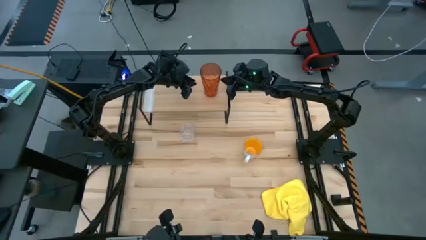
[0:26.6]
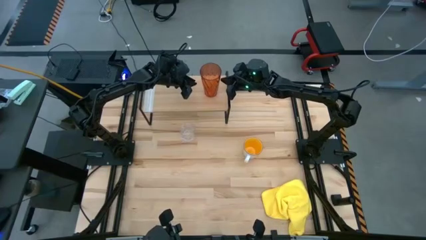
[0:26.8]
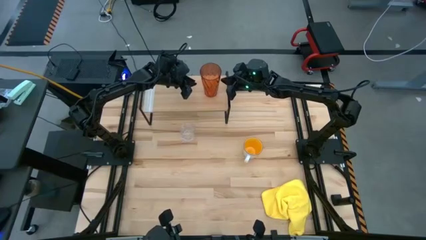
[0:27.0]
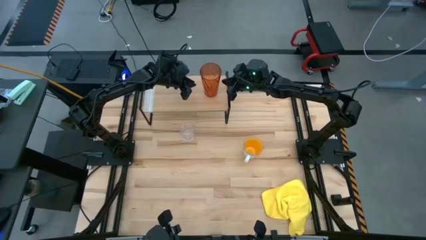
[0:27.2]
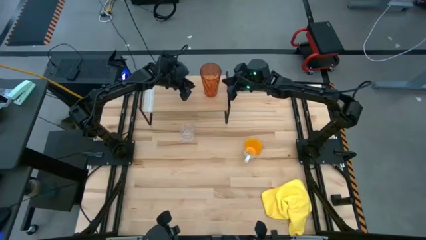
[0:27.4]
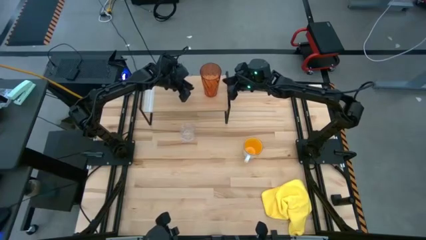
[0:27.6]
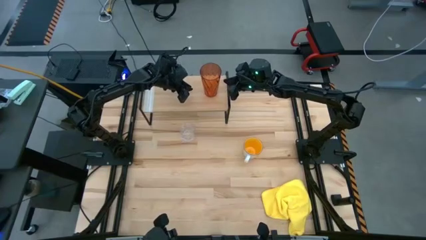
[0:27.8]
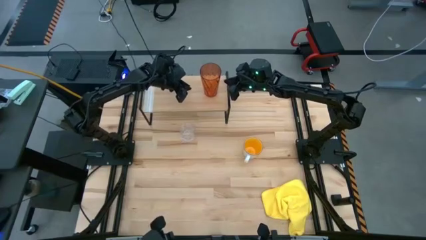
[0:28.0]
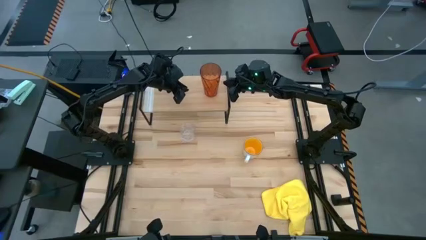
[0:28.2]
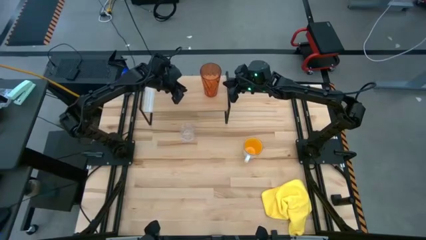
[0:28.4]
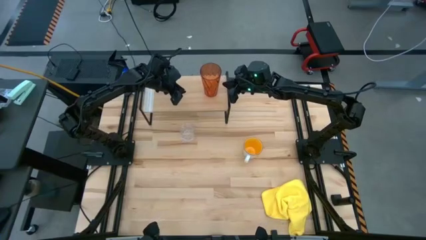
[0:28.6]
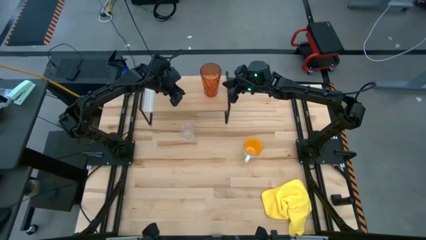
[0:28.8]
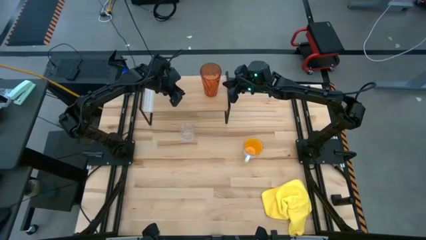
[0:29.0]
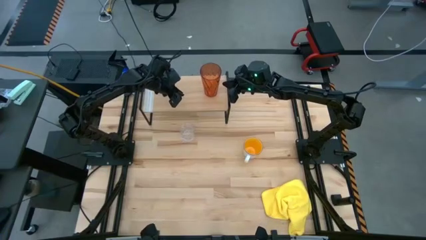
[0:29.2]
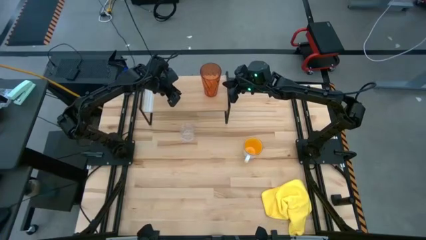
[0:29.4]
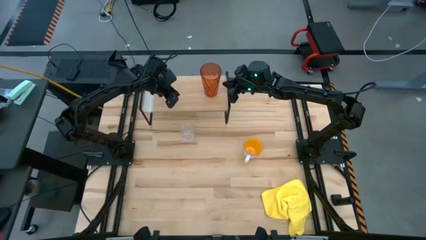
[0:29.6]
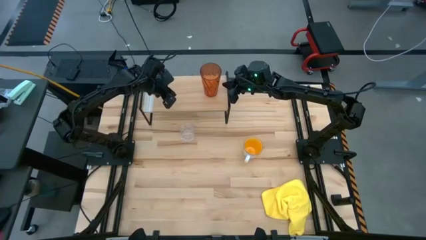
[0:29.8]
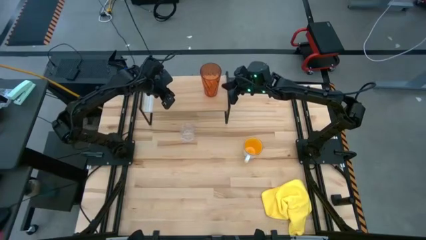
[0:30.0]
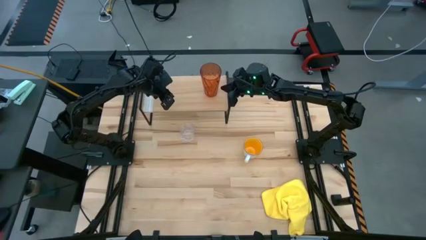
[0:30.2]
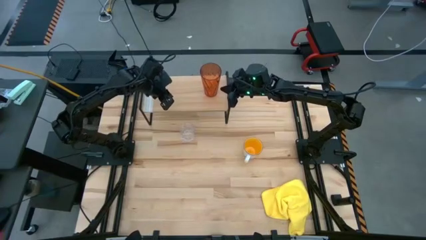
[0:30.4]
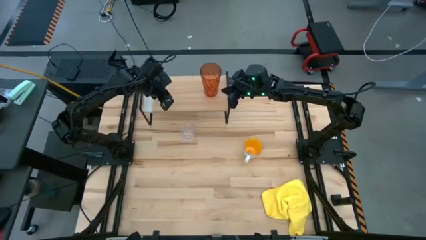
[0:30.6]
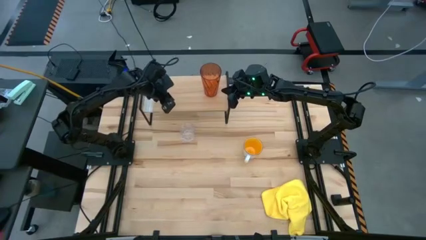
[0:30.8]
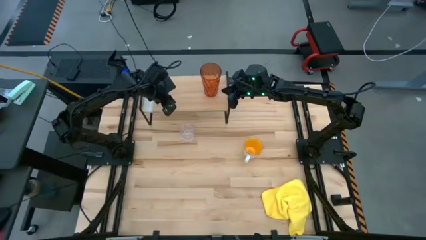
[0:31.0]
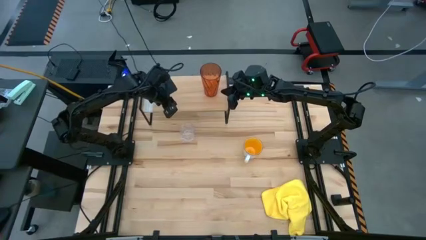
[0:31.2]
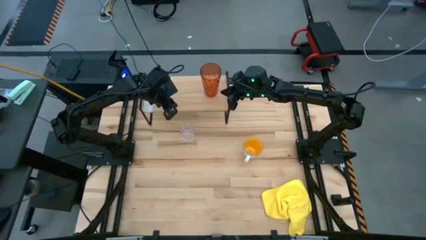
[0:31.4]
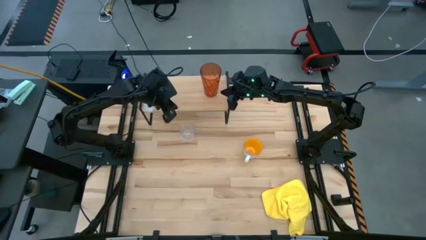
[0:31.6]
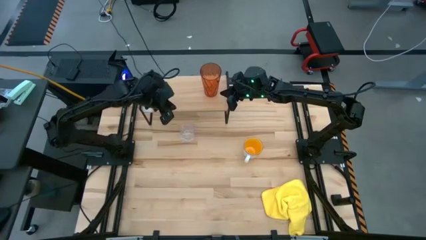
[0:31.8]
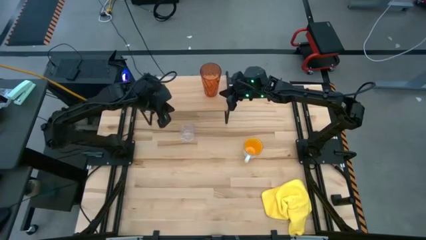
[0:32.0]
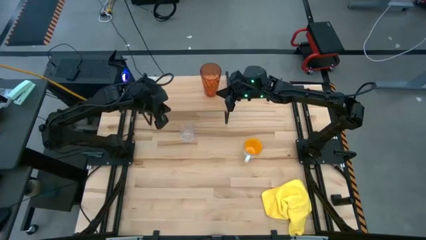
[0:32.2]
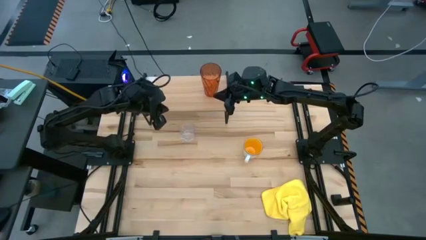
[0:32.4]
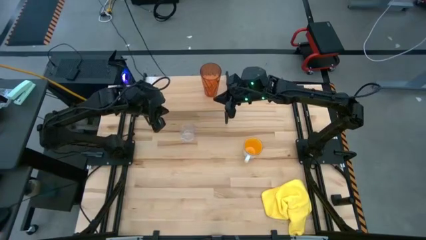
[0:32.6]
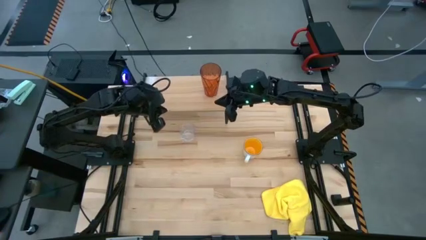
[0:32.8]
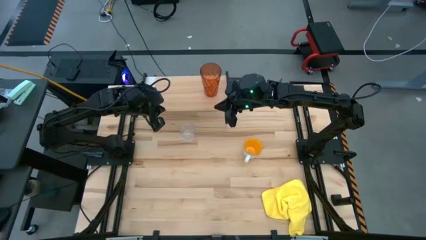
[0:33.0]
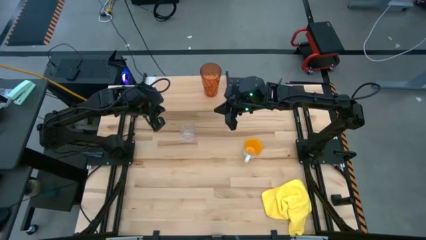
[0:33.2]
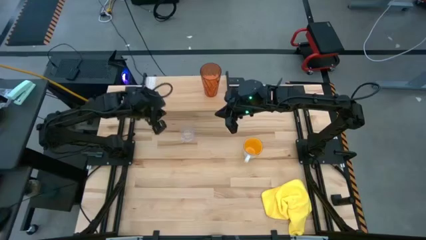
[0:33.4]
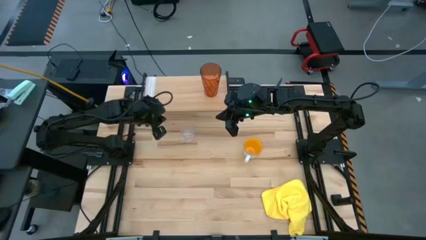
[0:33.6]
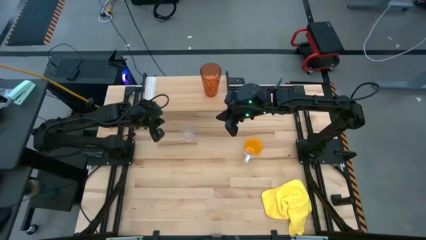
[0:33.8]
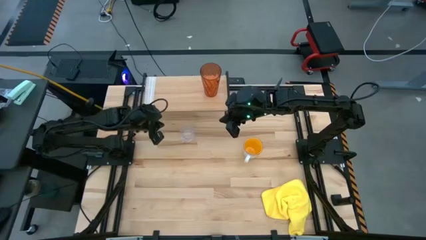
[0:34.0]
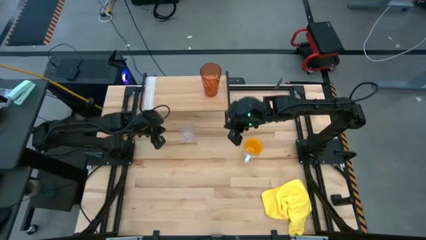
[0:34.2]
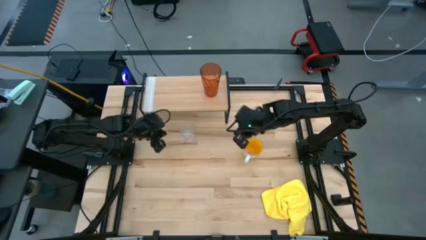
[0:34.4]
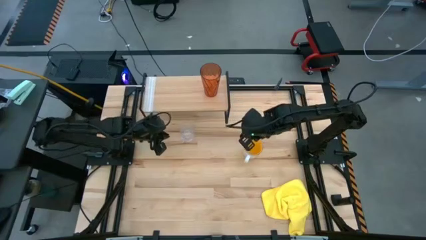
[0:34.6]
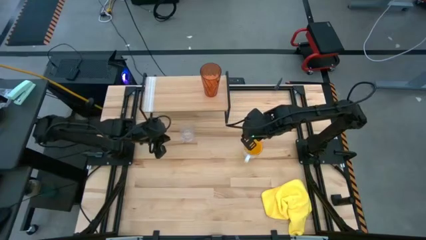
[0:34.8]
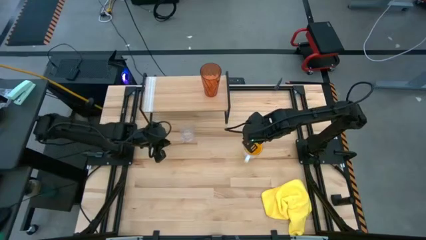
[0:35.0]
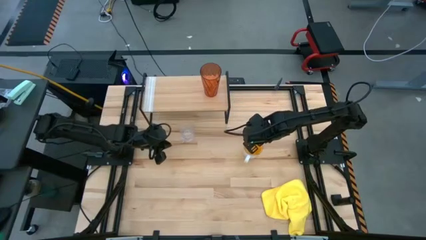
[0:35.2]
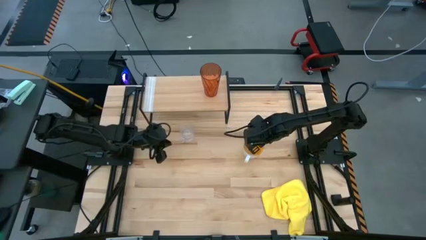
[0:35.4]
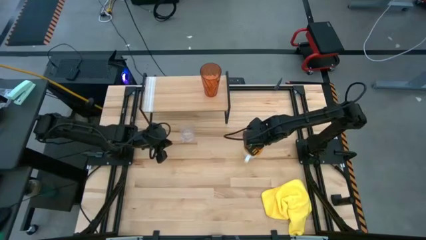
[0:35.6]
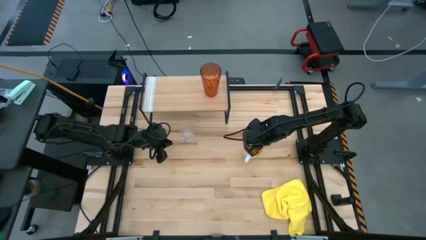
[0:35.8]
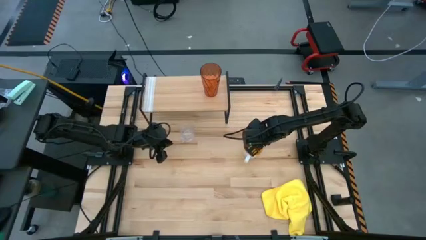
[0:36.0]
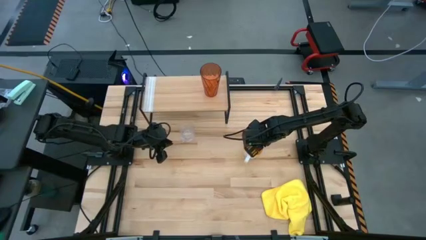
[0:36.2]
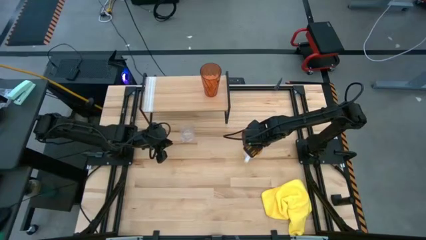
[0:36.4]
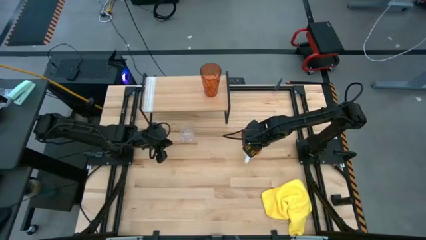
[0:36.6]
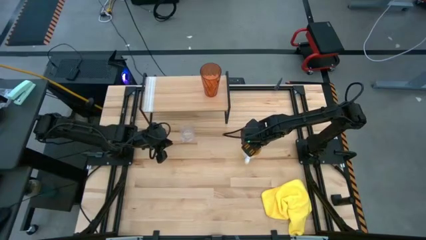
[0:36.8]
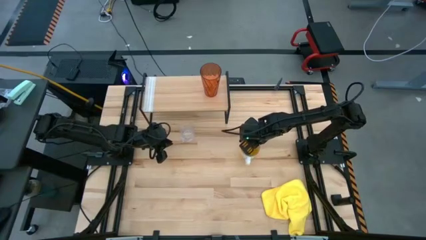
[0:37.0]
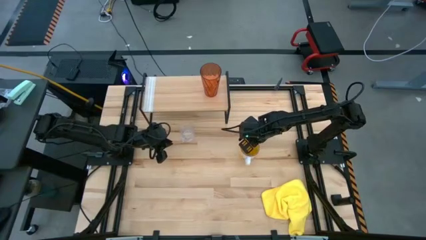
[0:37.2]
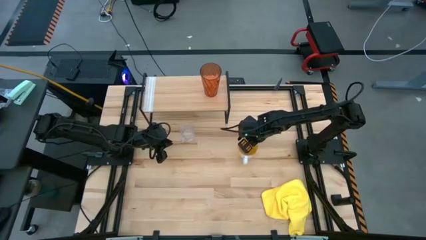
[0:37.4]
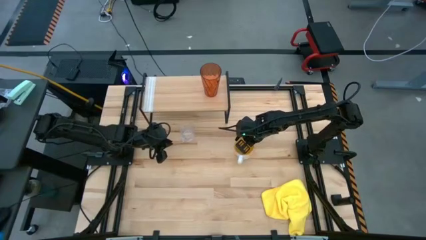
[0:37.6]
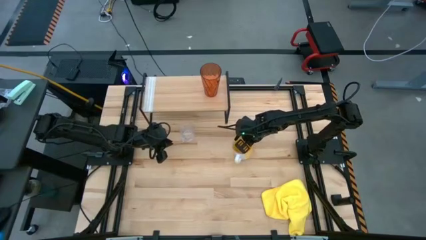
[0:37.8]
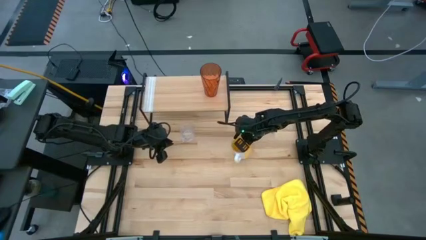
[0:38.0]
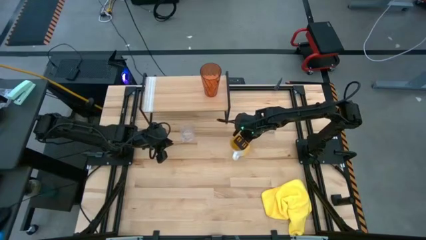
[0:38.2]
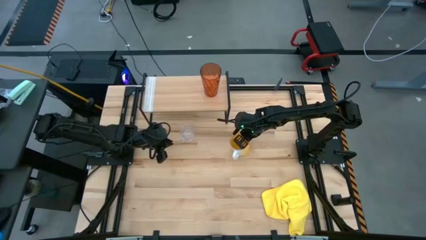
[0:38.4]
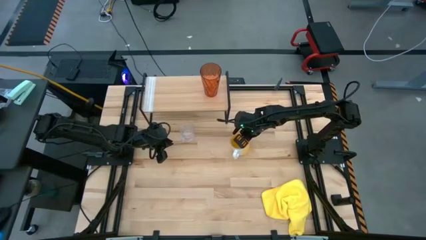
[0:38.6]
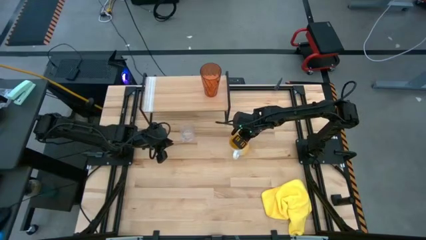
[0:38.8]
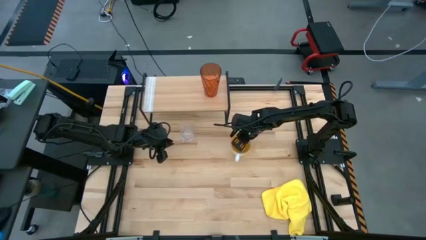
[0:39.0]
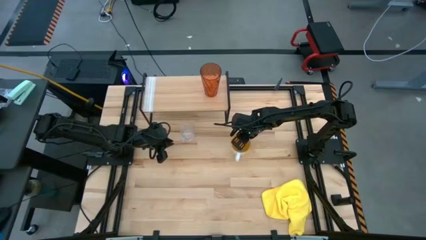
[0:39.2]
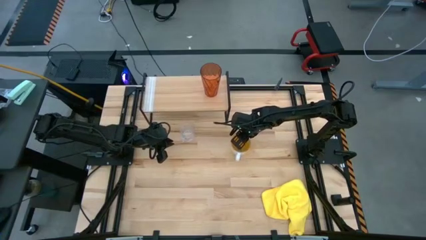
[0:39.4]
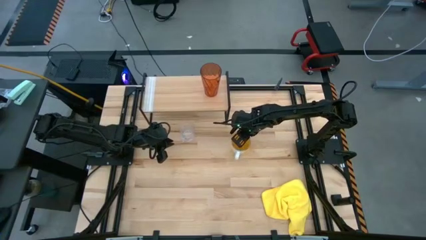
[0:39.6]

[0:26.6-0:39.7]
Task: Stack small to large cups/mugs on shelf
Put the yellow mug on the shelf
